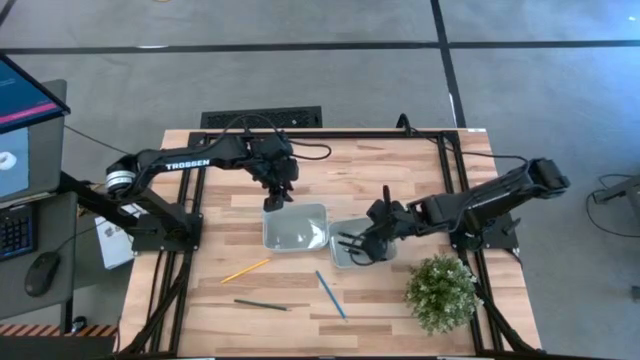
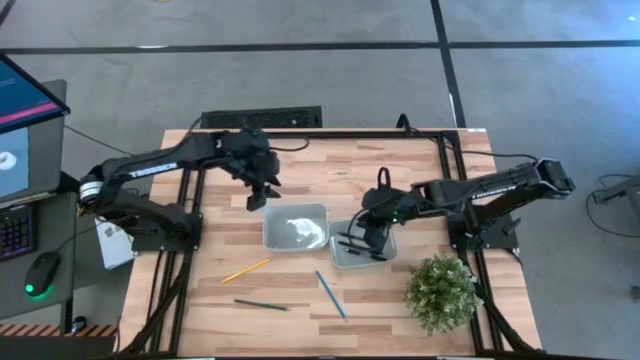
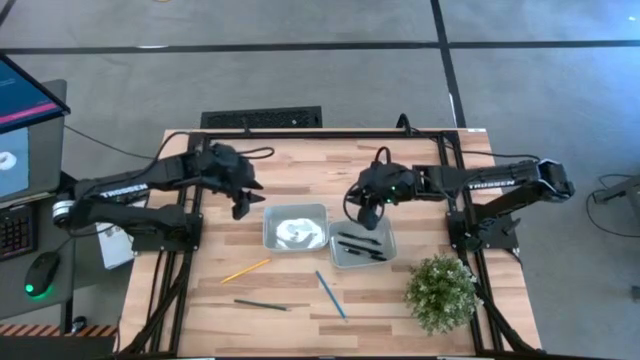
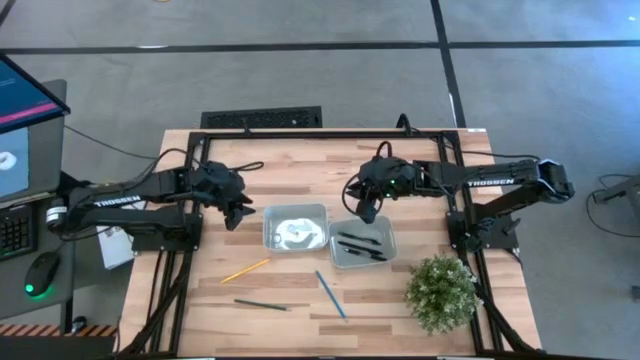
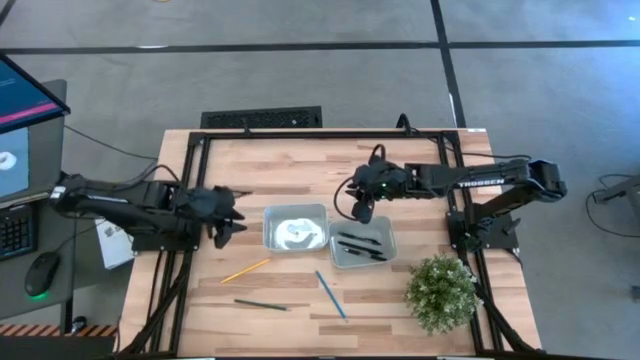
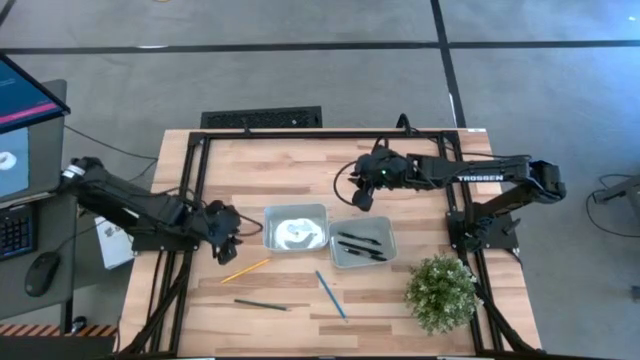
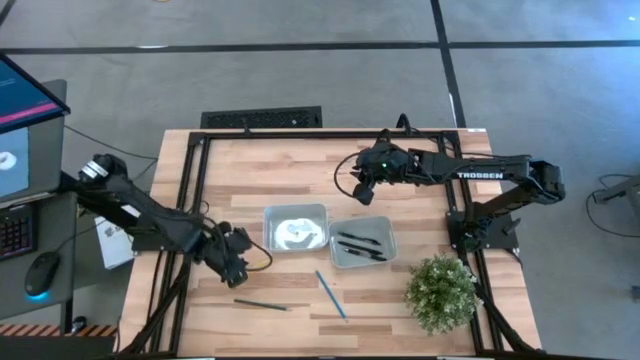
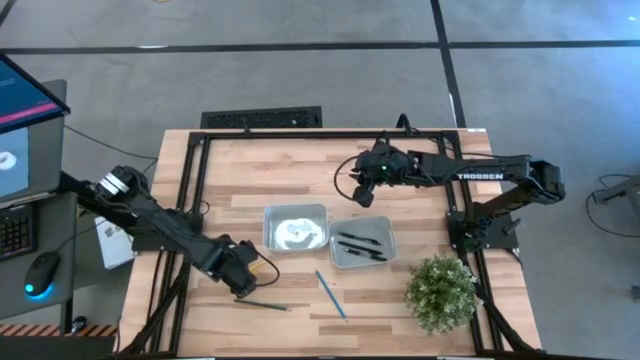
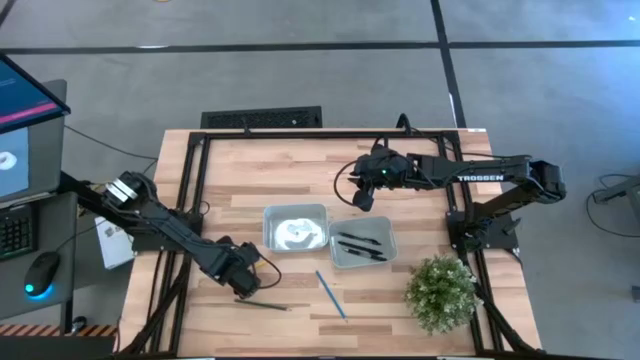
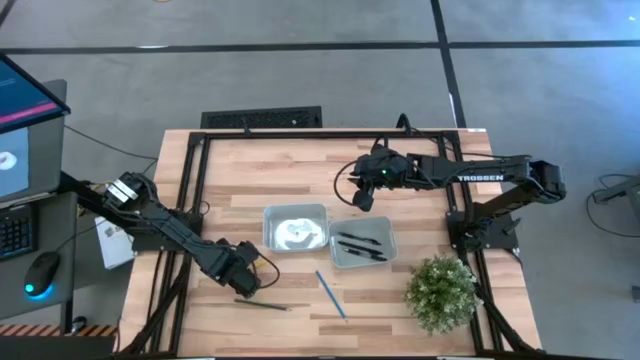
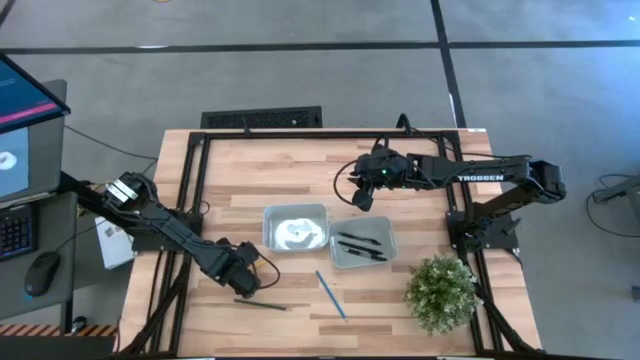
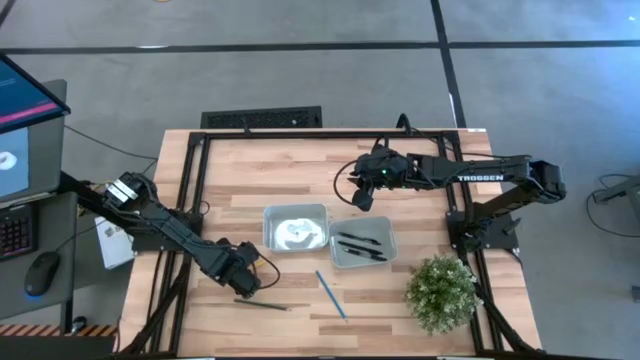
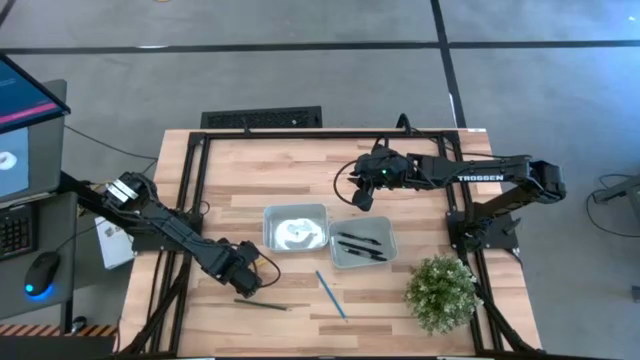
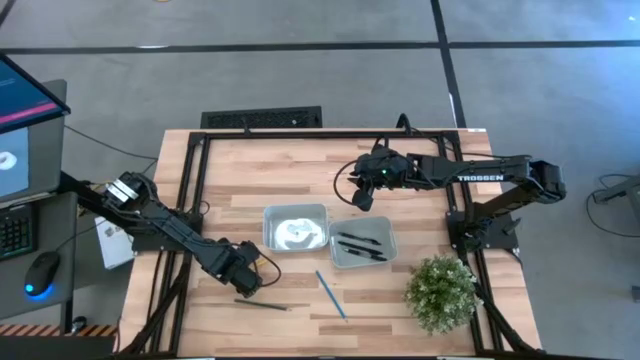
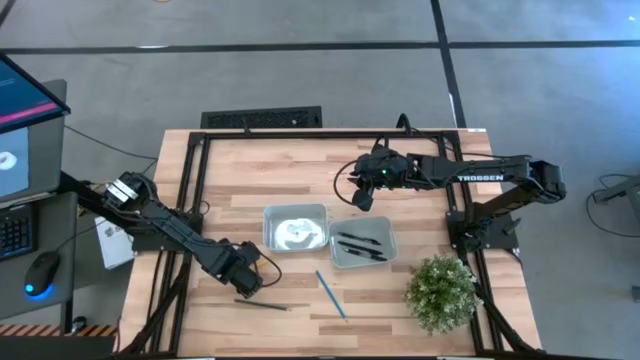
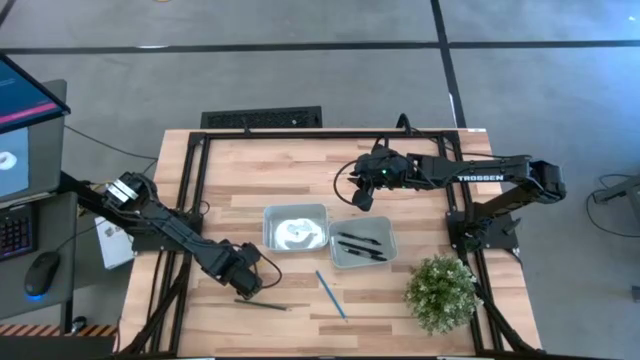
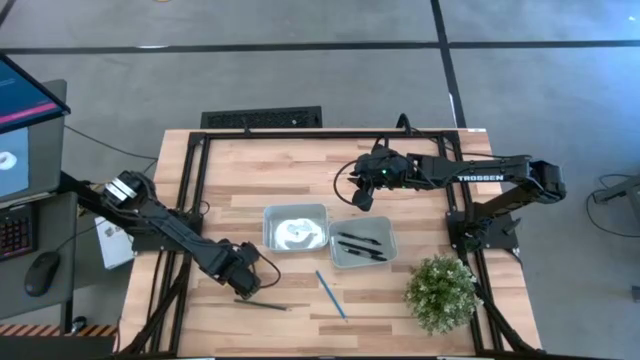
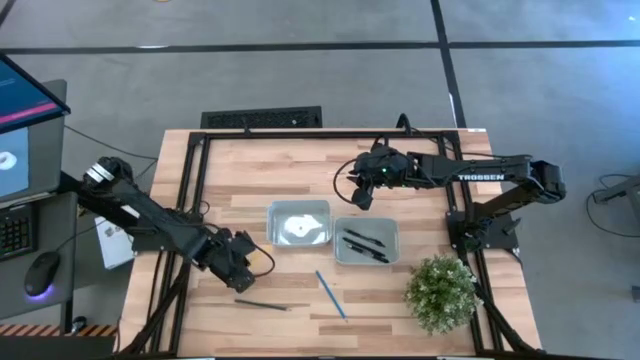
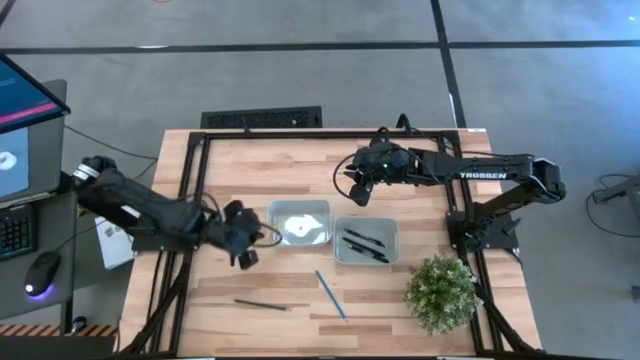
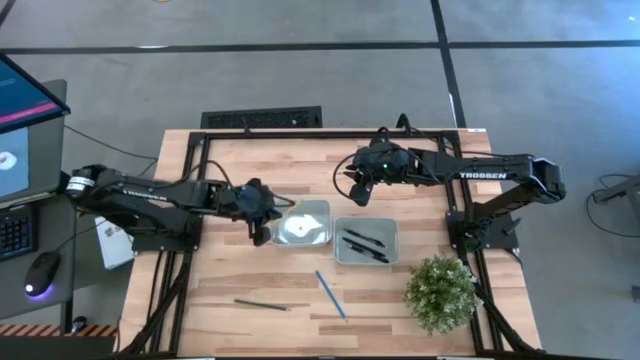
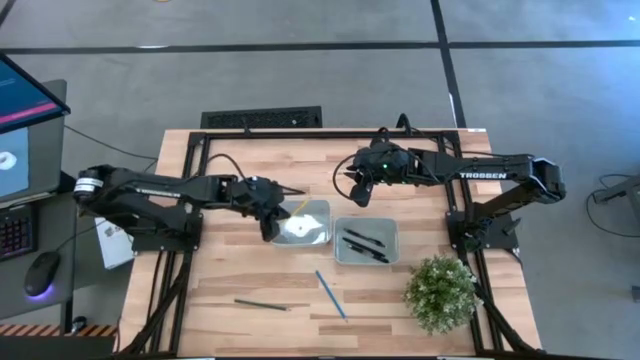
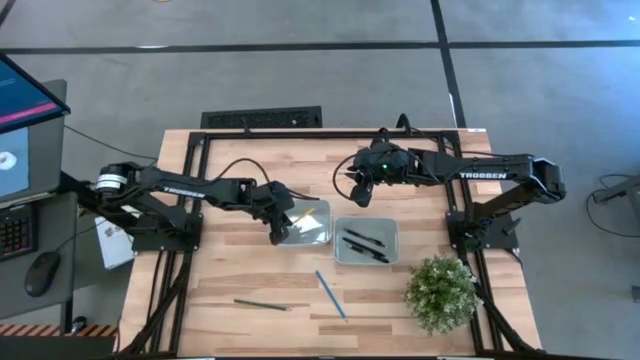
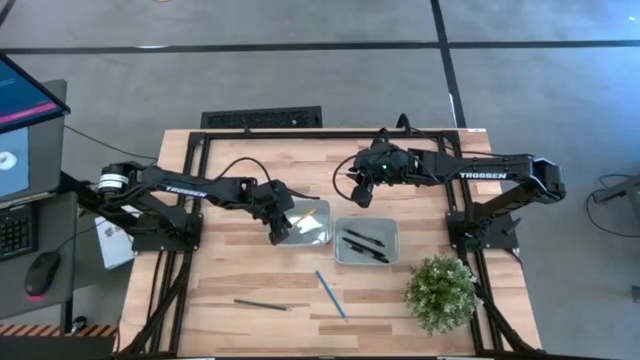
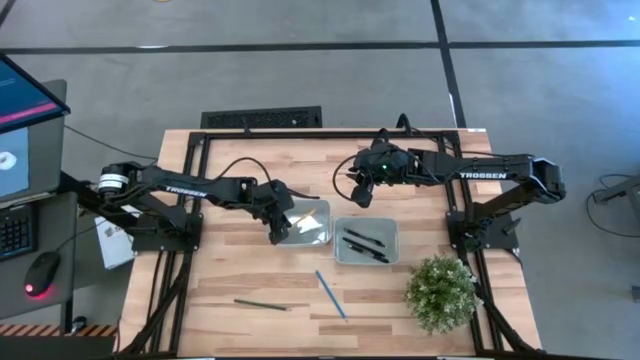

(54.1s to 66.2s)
Task: Sort pens & pencils
Put the yellow pencil into the left gray bin

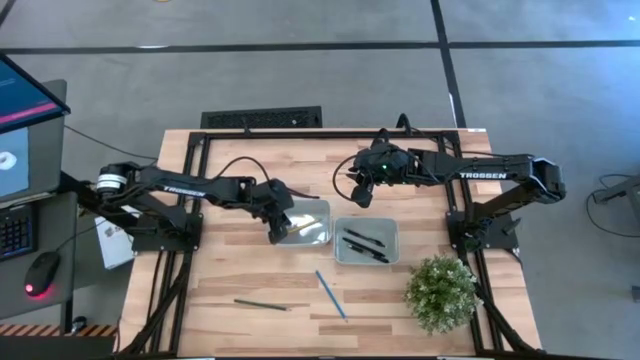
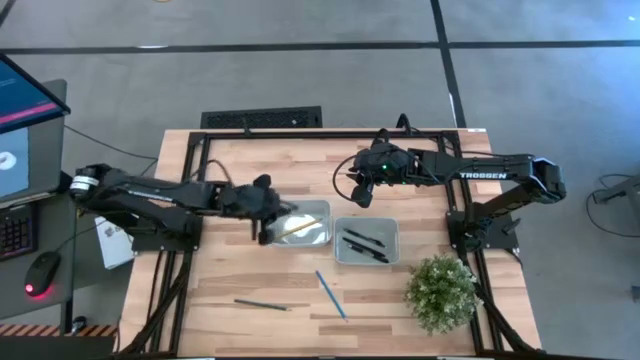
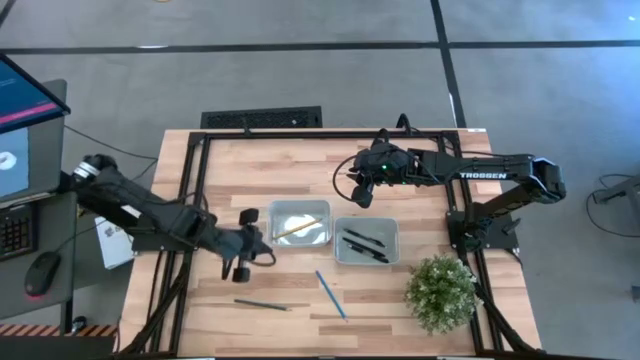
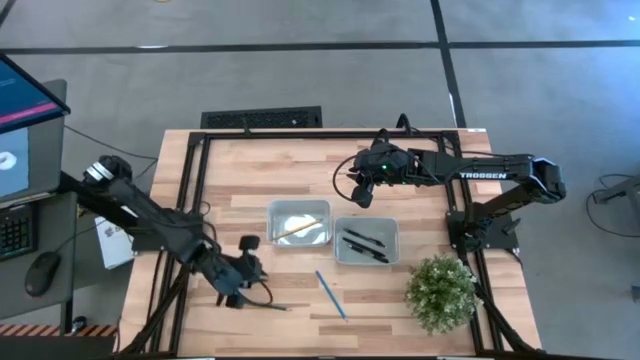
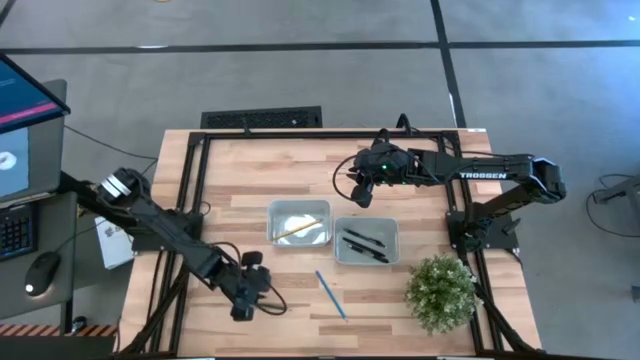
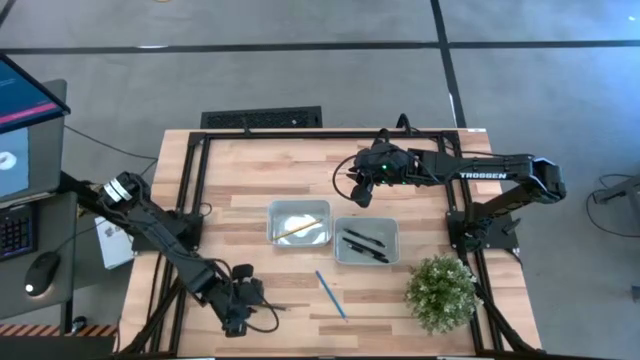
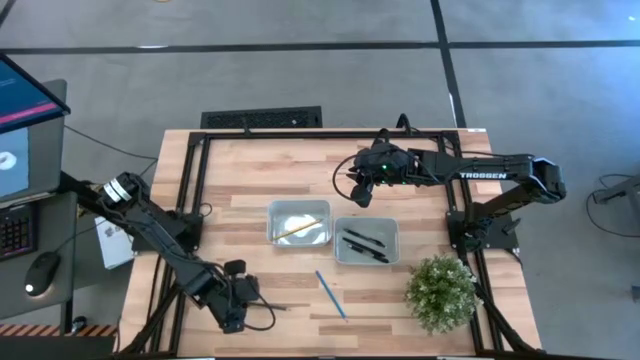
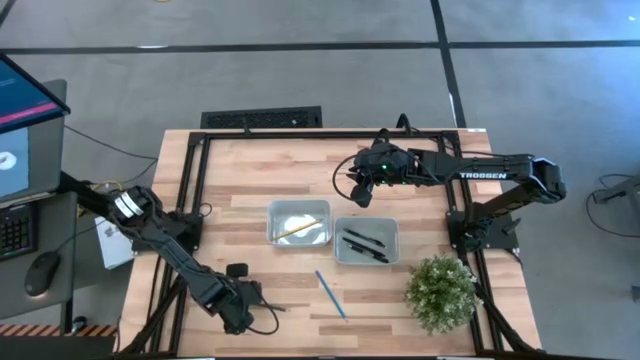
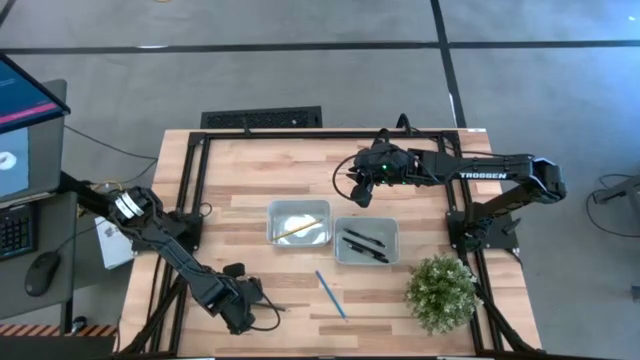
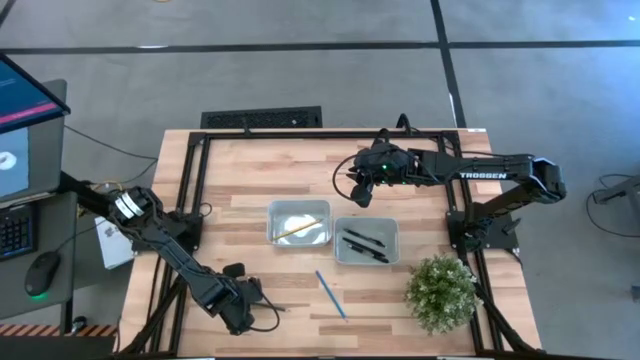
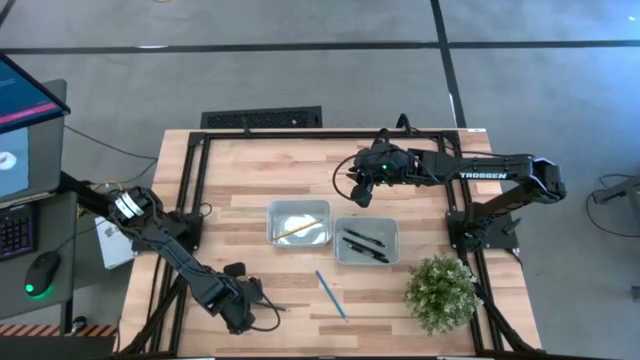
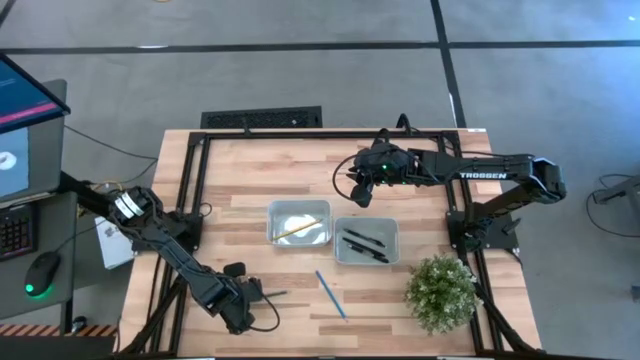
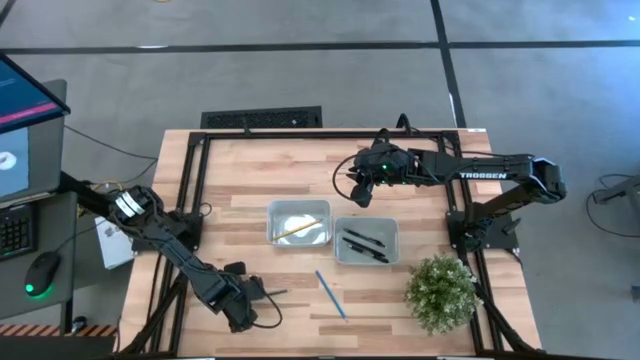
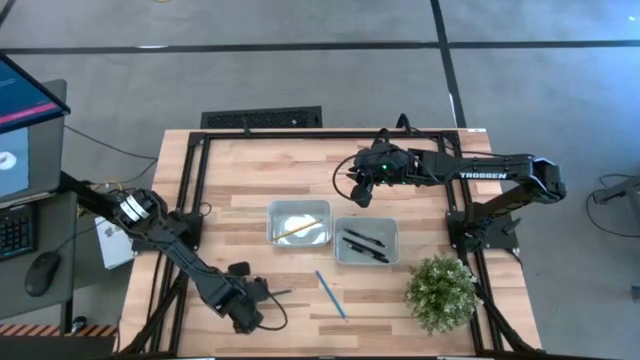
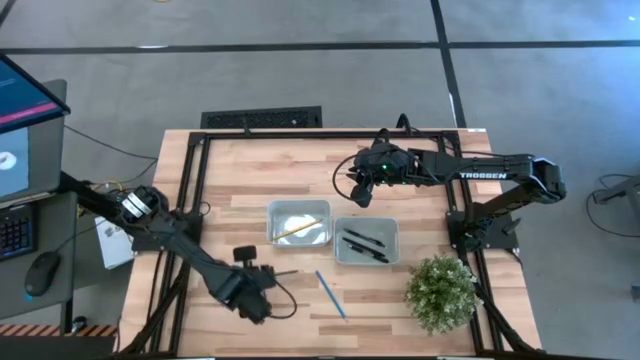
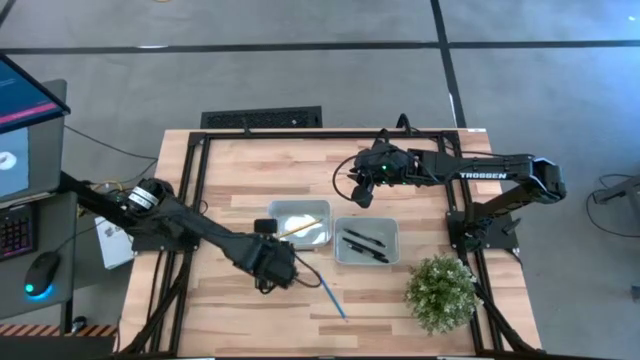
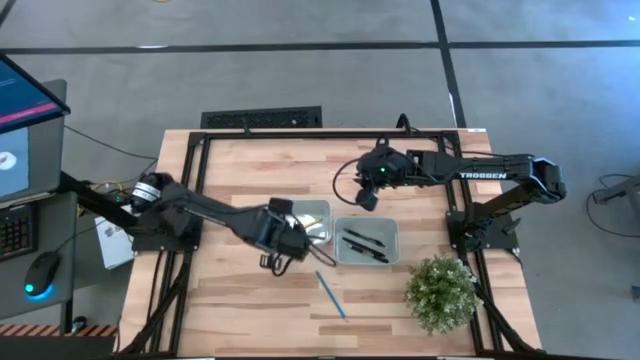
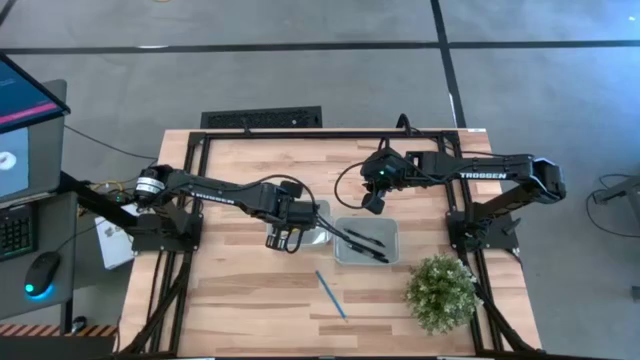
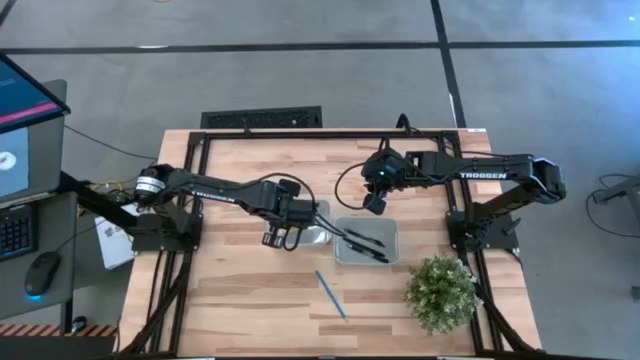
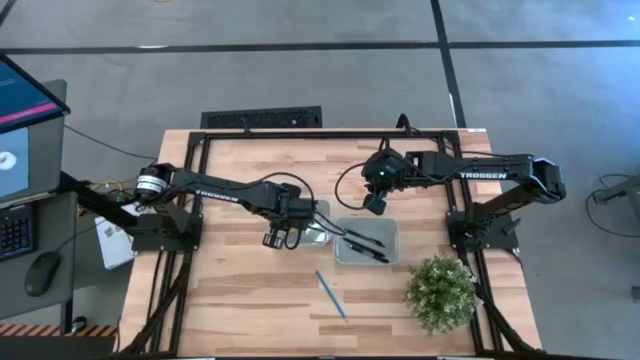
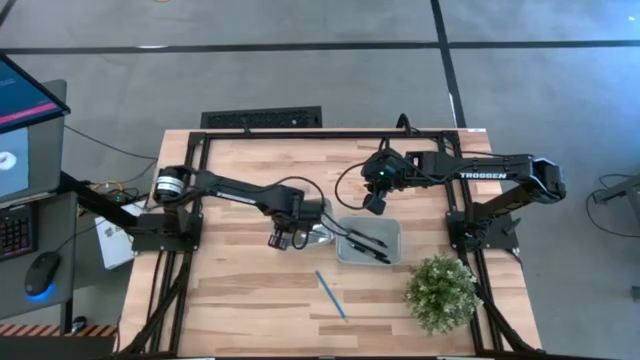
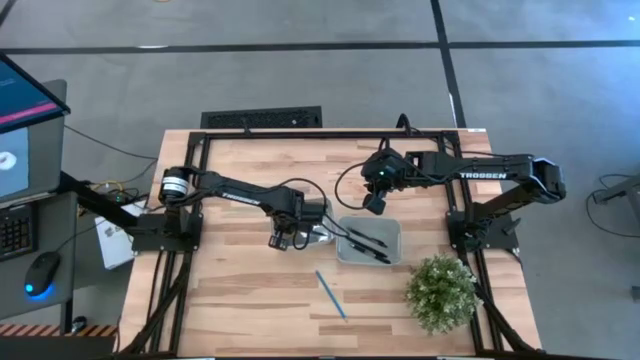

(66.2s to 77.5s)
Put the green pencil into the left gray bin
